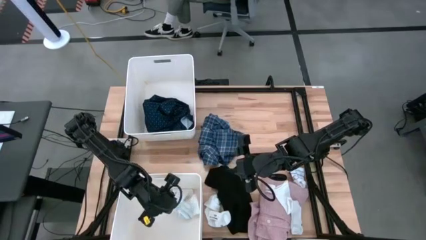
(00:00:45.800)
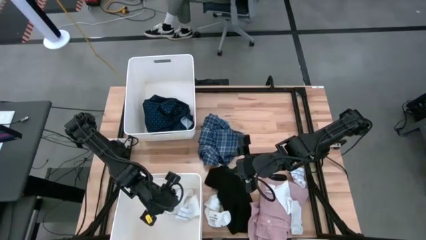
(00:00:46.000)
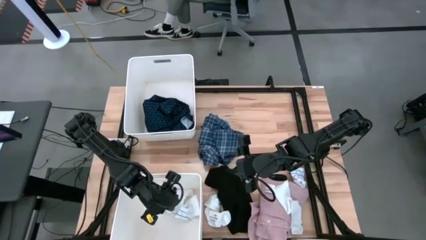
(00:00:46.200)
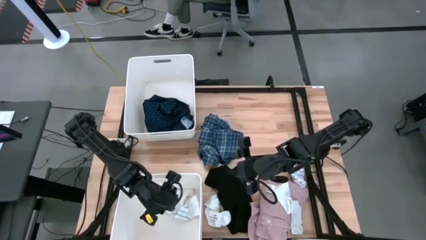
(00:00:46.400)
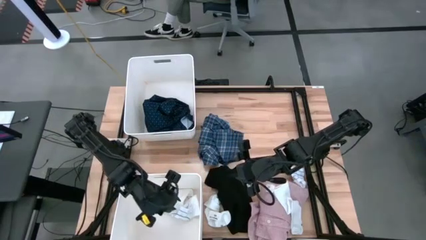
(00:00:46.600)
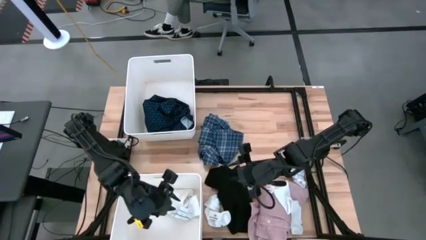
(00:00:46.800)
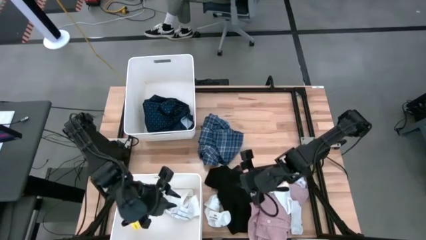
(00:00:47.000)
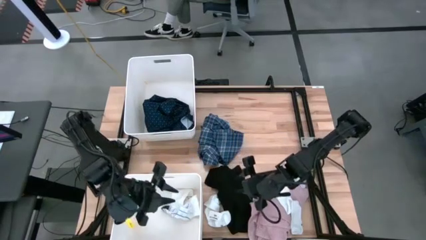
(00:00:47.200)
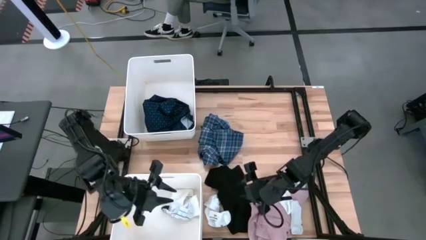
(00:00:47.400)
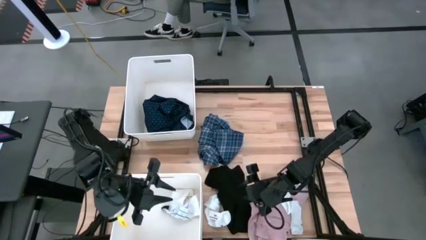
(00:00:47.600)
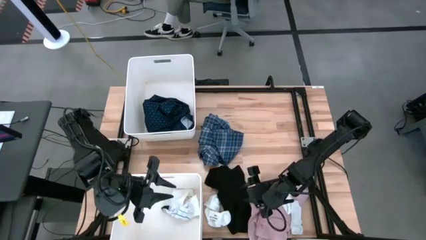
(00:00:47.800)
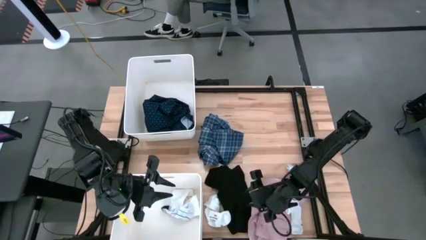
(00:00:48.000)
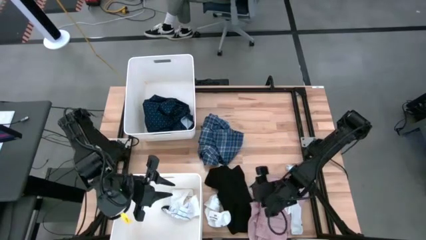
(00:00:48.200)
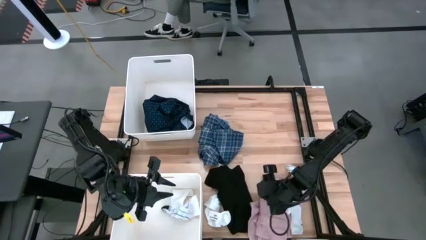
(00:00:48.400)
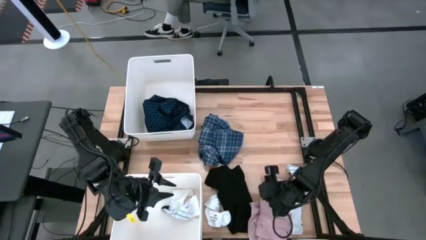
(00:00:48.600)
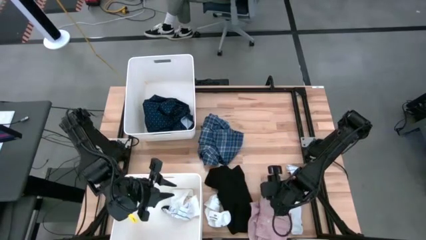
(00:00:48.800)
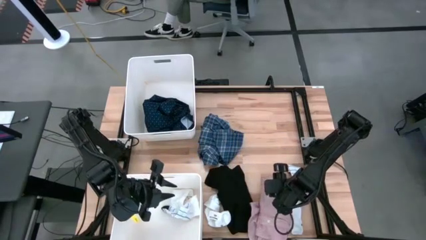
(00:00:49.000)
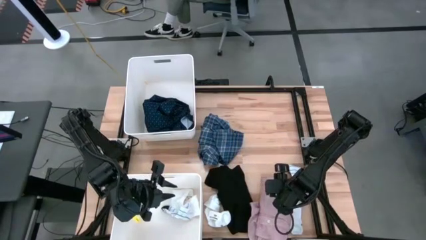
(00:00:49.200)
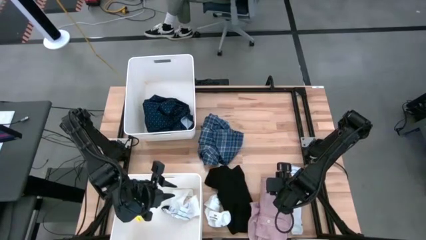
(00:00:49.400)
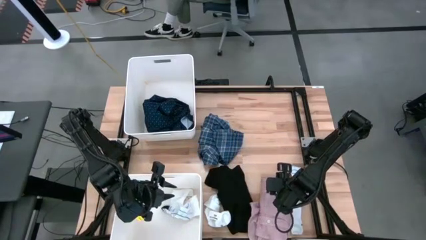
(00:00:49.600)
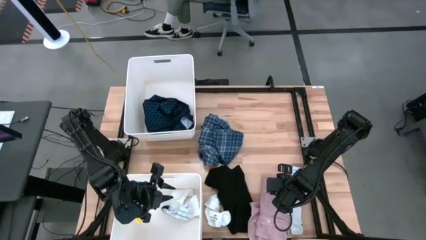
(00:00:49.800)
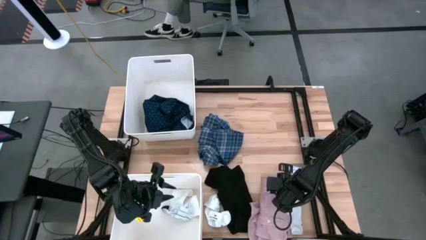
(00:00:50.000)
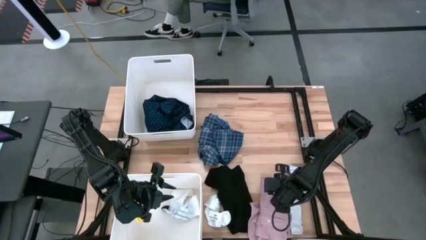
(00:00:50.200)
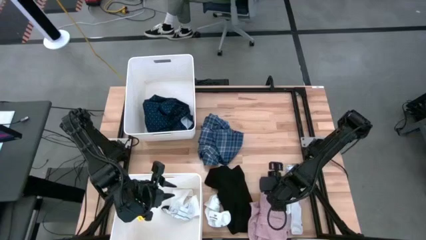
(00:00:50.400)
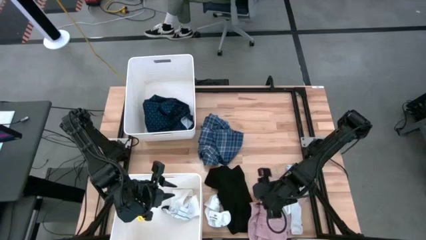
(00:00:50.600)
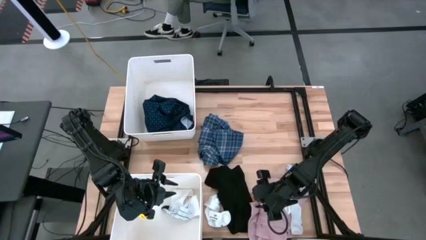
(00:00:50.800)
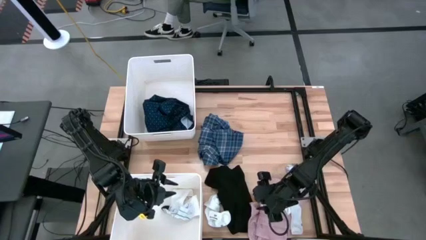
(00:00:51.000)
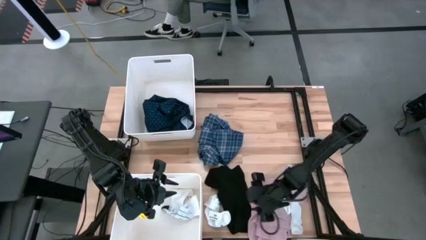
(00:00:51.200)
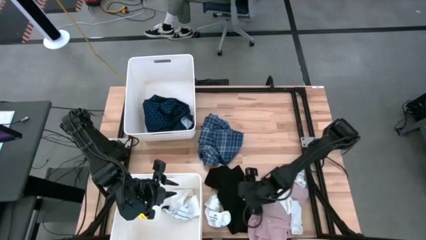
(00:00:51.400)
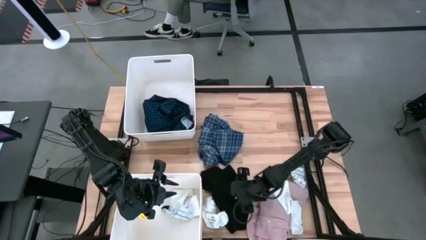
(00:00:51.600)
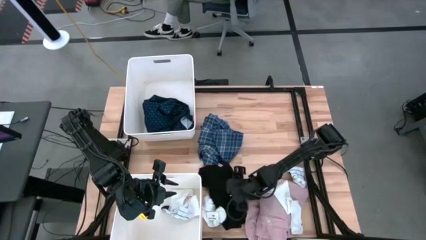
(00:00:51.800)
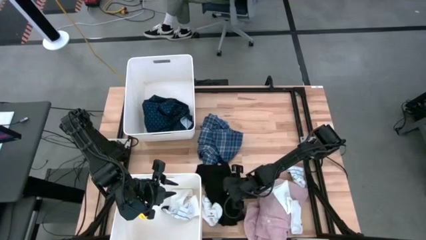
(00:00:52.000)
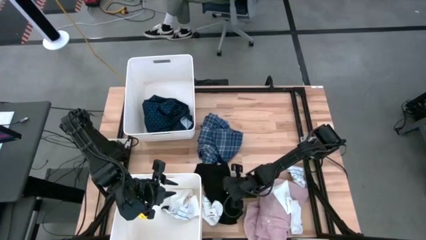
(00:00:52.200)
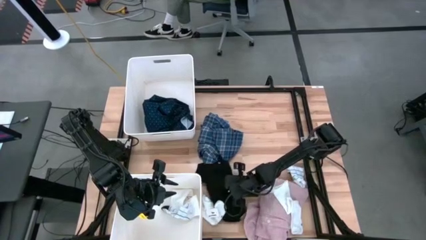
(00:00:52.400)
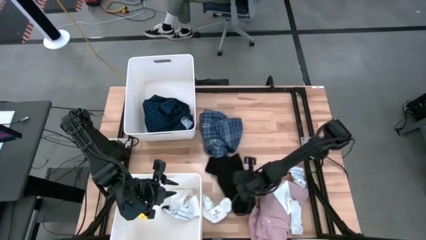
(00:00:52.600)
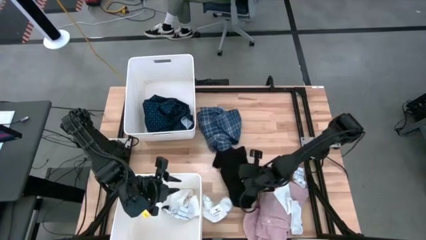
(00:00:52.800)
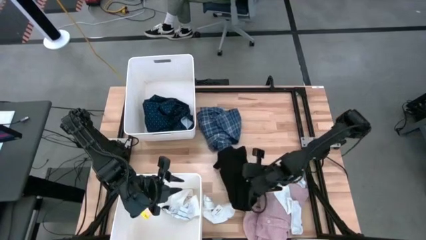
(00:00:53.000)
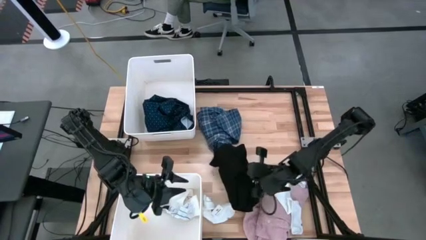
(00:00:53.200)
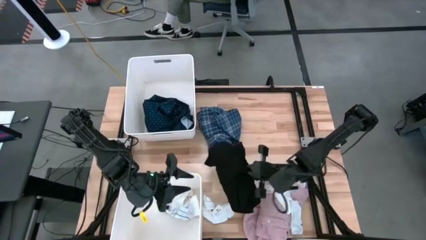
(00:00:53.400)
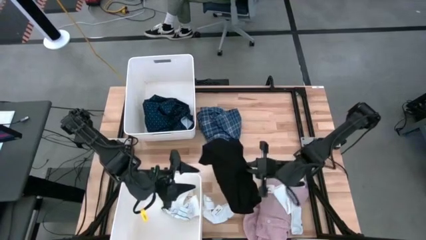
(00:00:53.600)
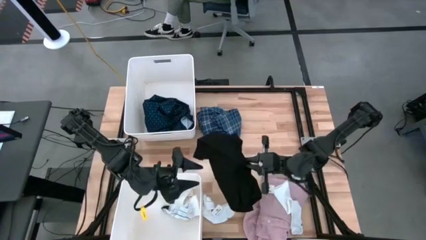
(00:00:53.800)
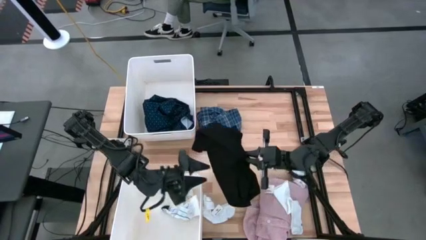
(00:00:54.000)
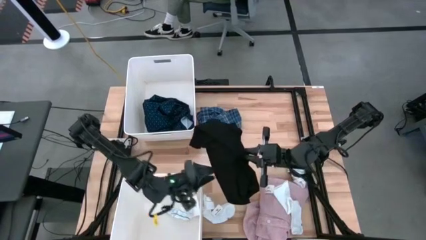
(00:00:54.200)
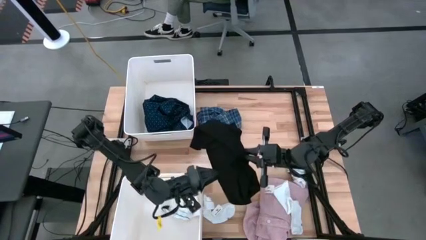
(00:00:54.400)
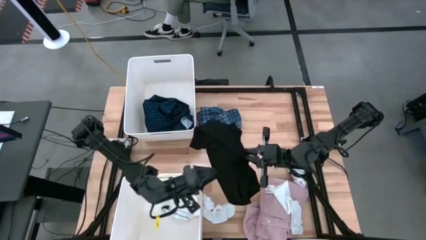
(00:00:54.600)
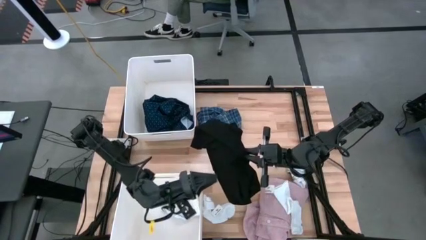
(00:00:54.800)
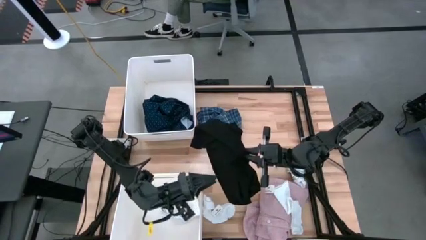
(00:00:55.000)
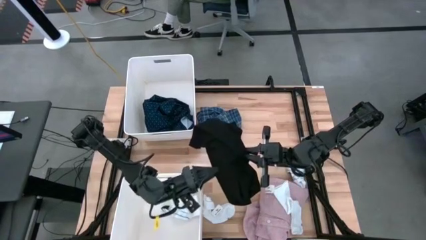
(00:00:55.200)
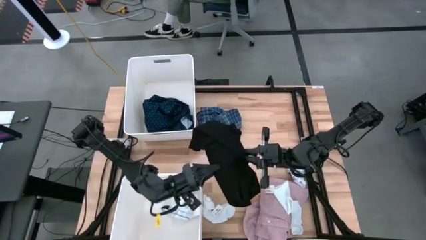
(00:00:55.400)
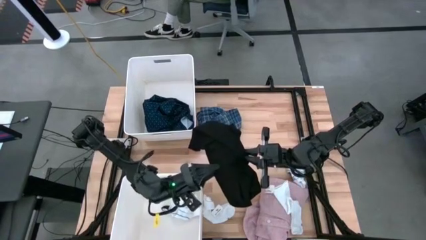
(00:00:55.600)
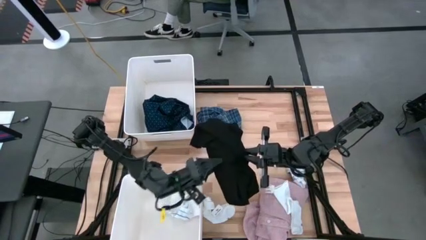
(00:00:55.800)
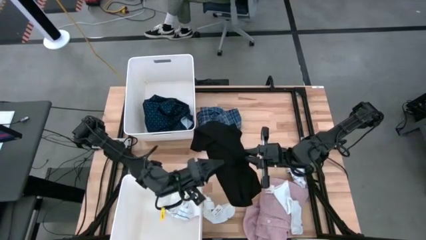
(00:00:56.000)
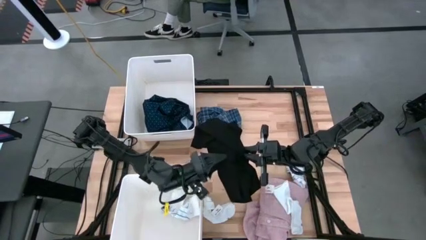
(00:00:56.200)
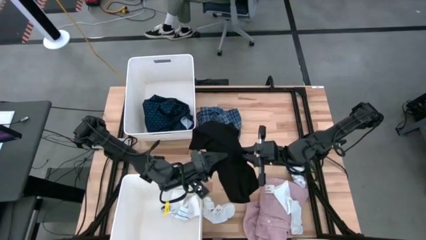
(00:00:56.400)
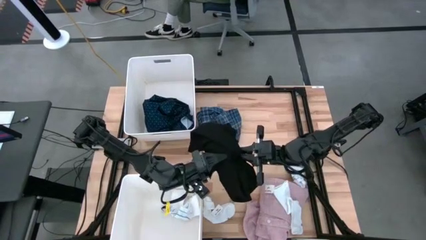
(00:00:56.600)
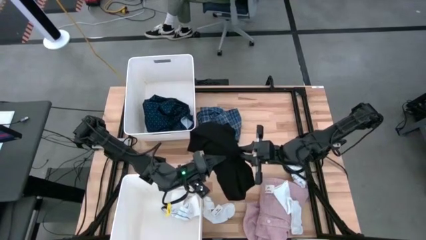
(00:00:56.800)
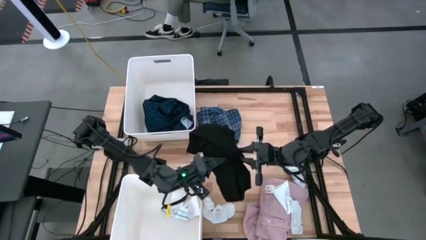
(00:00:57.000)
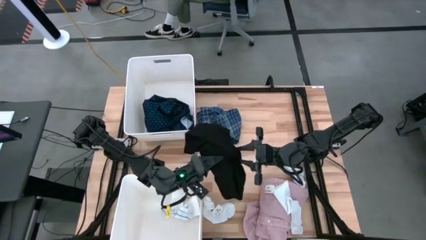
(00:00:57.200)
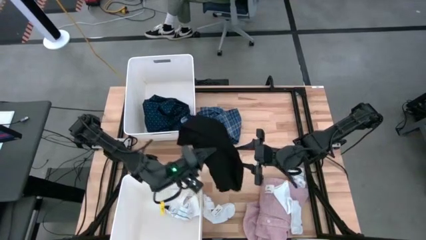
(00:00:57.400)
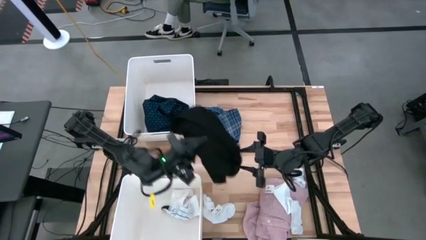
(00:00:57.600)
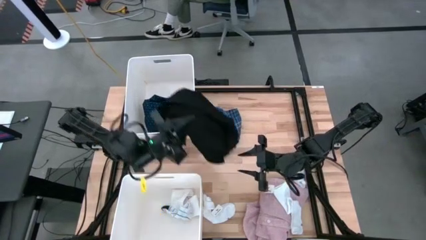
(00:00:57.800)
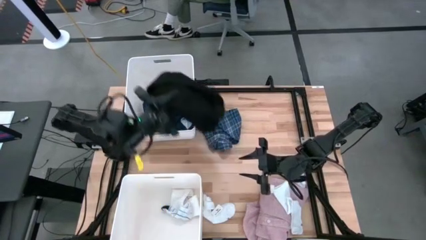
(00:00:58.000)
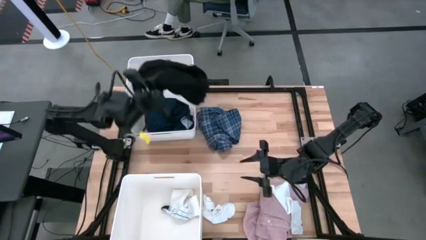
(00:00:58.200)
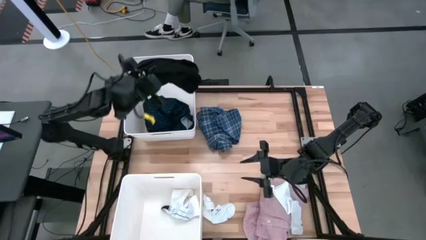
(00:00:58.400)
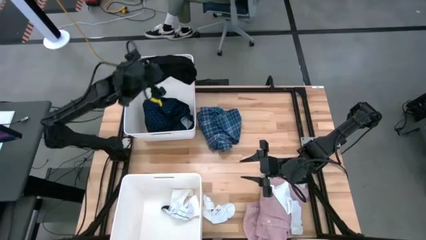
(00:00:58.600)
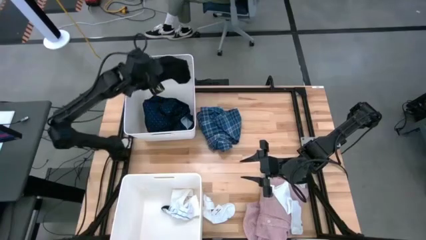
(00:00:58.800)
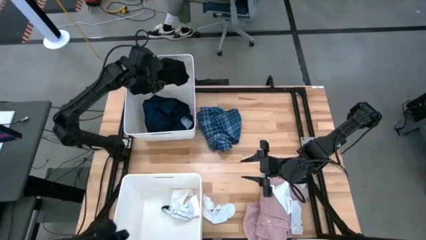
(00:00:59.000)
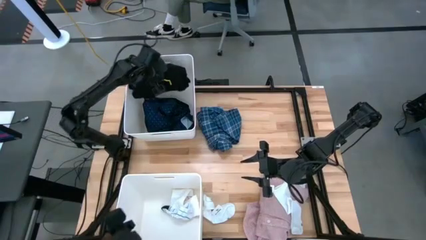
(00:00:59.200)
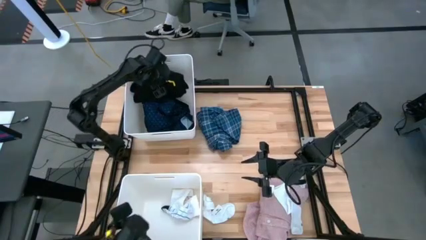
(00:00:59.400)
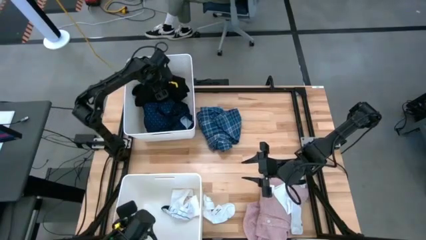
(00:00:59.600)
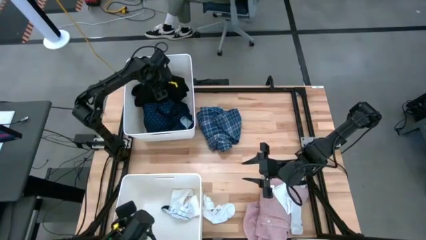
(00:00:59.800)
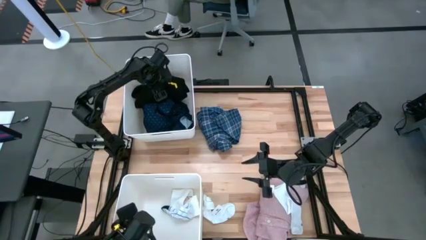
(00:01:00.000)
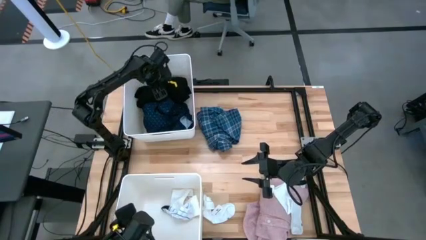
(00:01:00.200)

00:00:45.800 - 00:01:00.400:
Task: Sort clothes
Put the black shirt into the top white laundry organizer

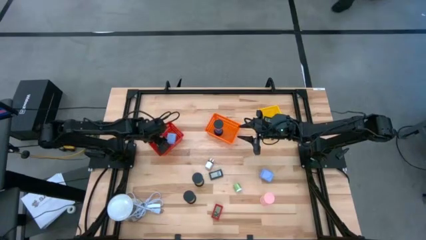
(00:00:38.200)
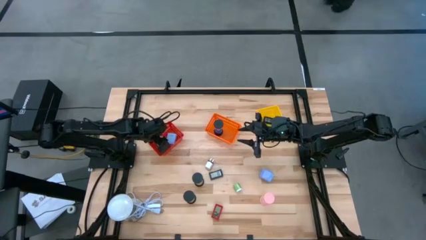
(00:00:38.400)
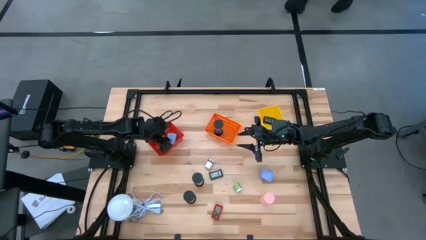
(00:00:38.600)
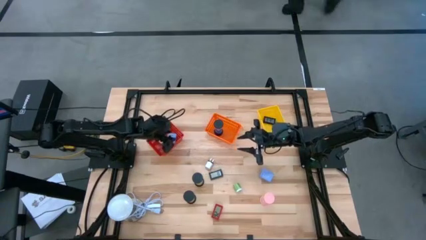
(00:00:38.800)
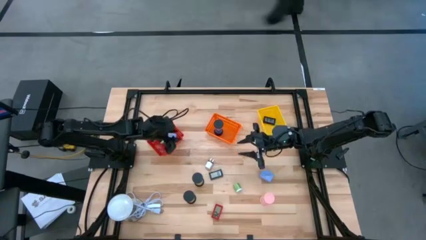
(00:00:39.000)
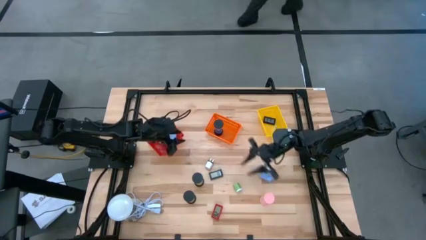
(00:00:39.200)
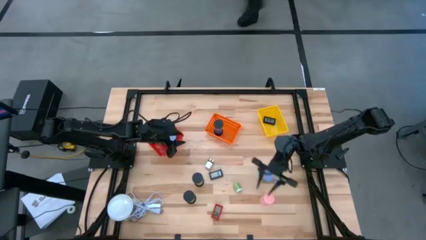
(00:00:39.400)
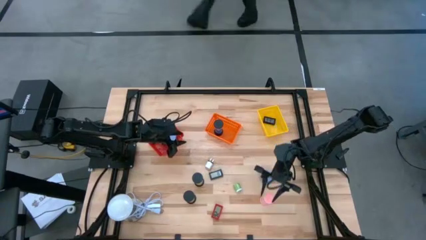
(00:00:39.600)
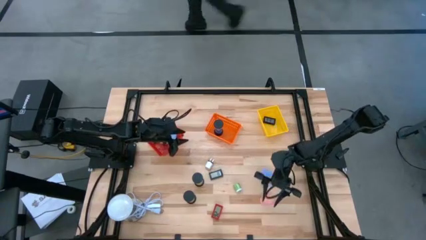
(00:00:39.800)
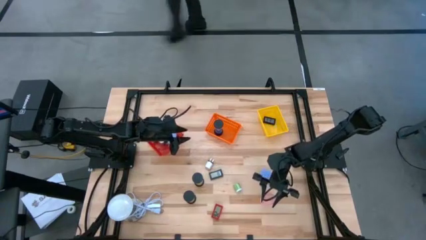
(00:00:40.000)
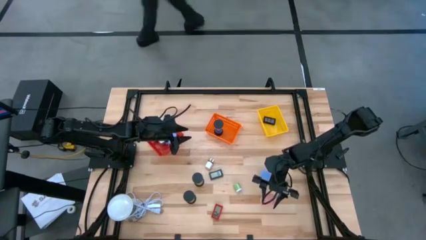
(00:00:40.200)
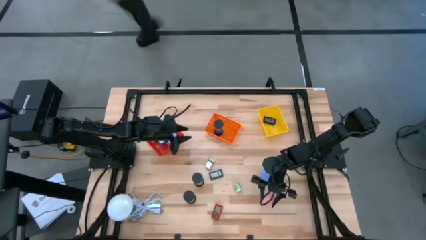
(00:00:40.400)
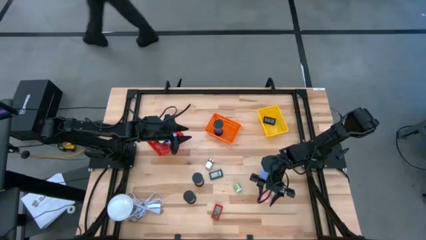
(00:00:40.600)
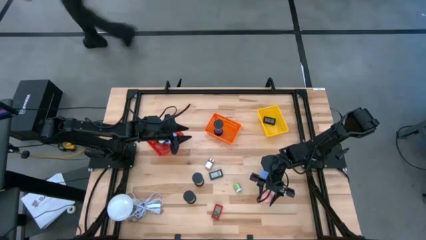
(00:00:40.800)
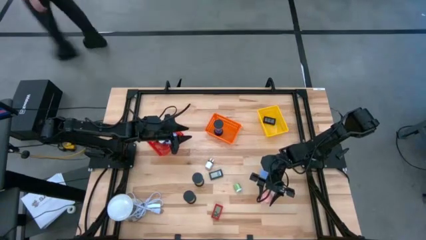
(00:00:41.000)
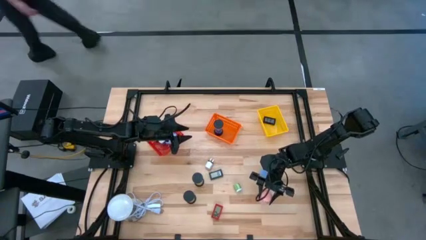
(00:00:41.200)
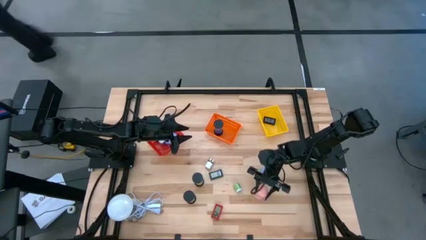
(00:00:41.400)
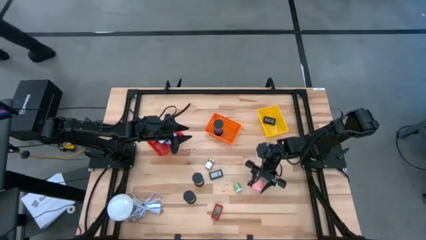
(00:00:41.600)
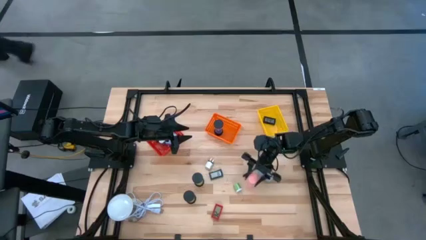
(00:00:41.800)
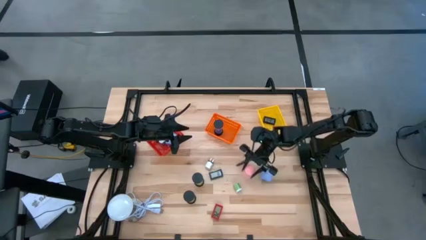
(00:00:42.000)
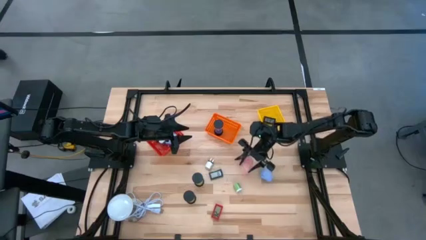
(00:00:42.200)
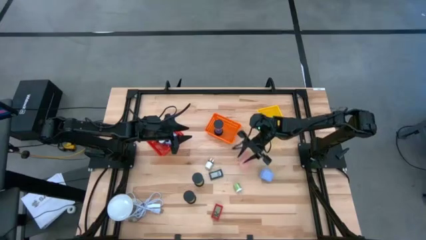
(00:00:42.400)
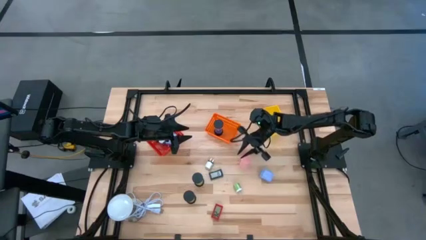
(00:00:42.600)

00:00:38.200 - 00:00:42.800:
Task: Pick & Place Office items
Put the pink hourglass into the orange basket
